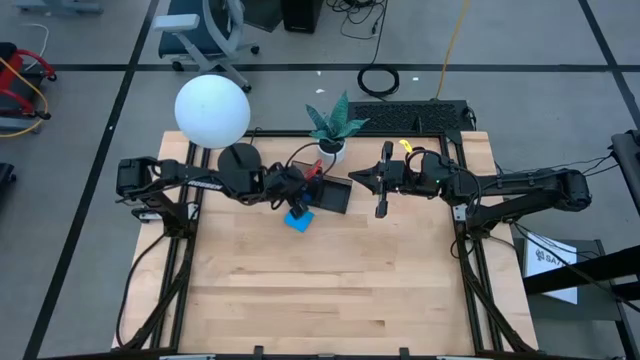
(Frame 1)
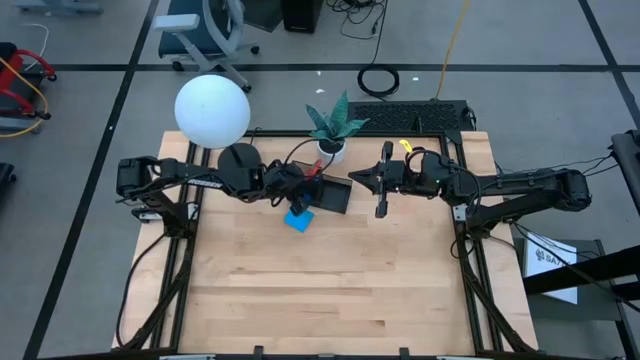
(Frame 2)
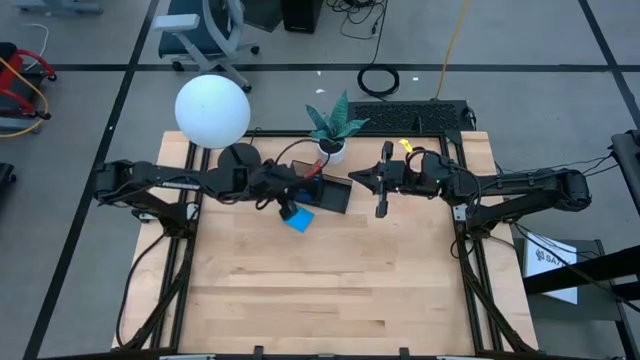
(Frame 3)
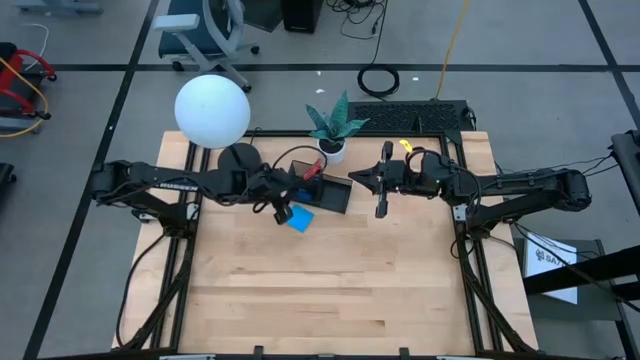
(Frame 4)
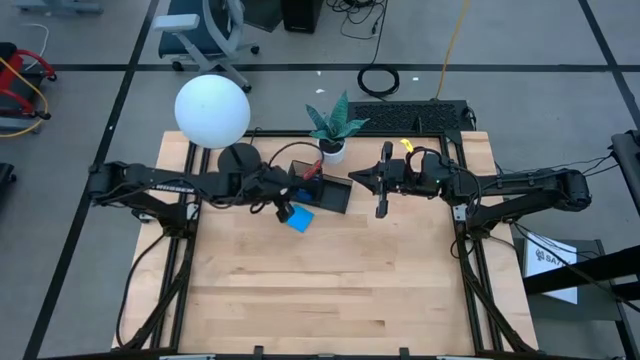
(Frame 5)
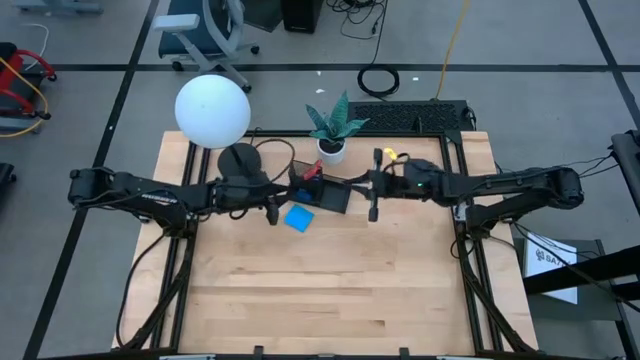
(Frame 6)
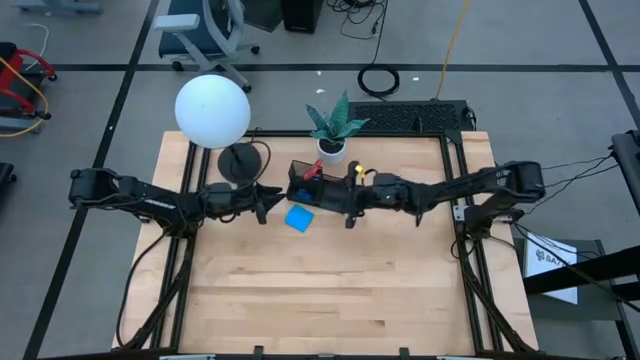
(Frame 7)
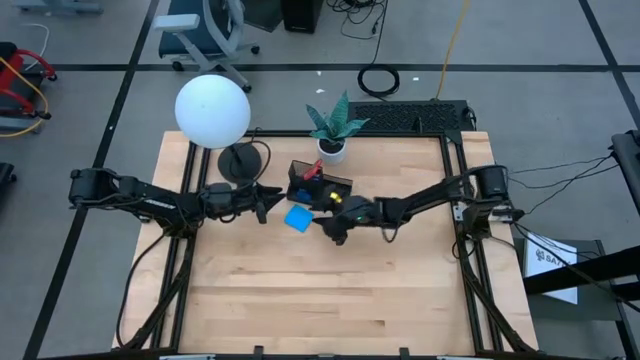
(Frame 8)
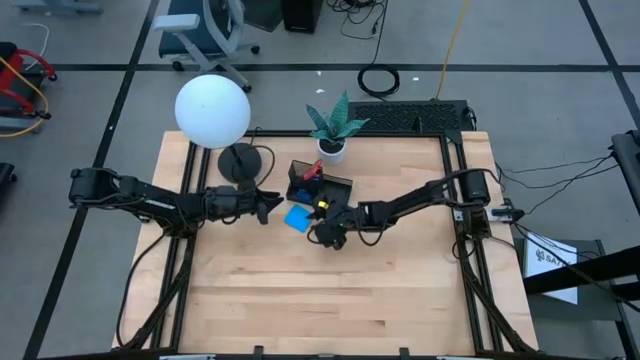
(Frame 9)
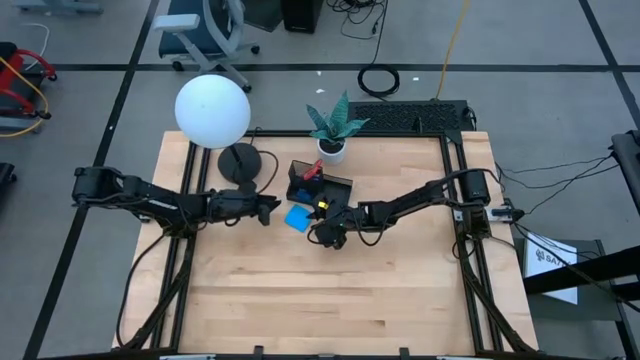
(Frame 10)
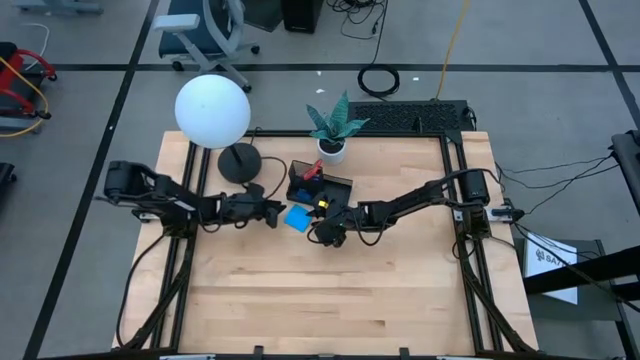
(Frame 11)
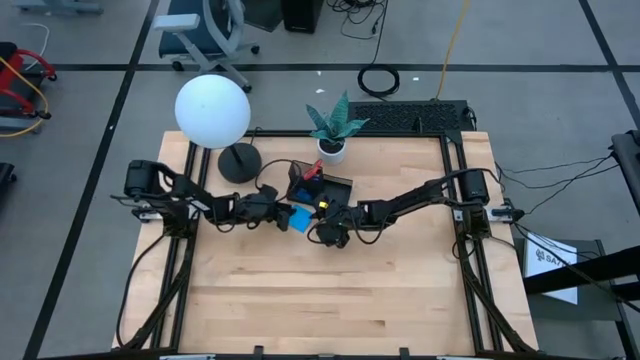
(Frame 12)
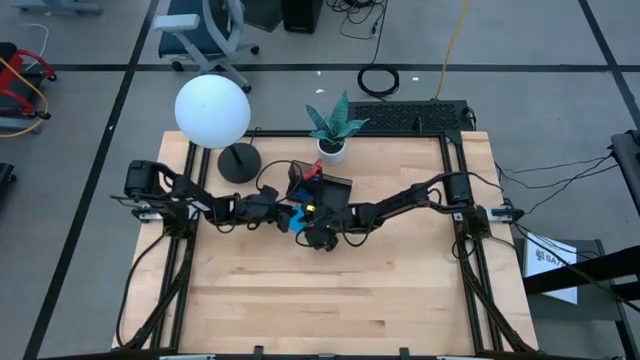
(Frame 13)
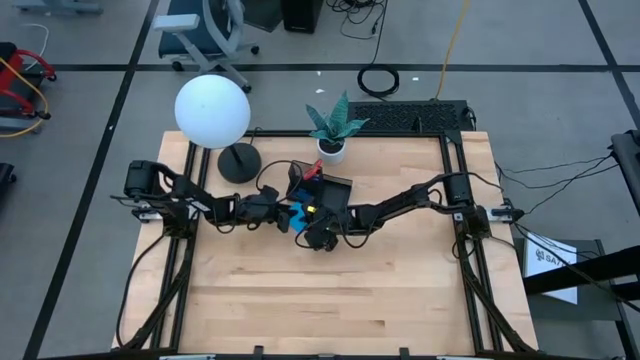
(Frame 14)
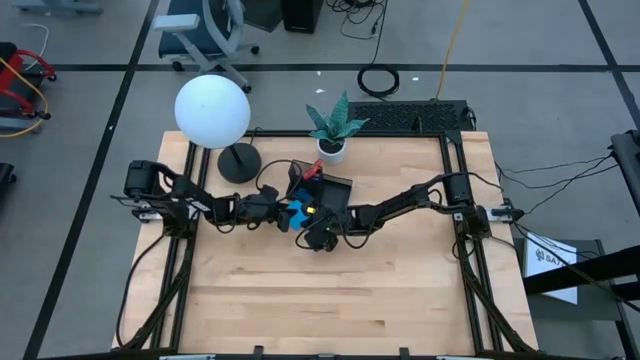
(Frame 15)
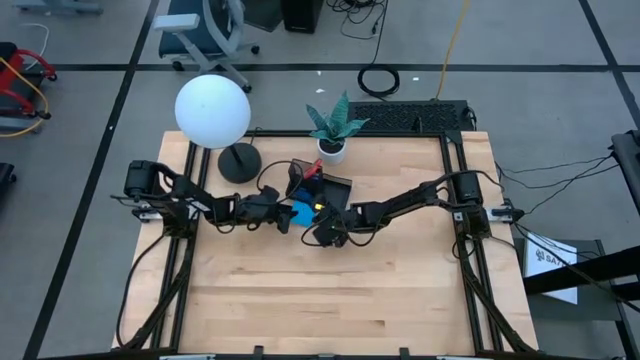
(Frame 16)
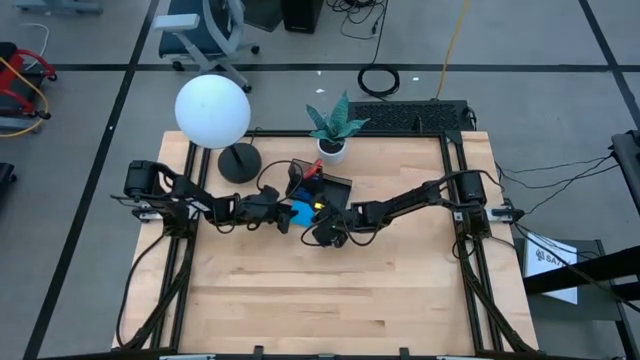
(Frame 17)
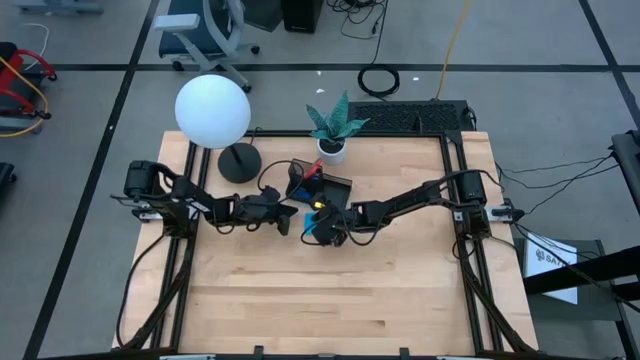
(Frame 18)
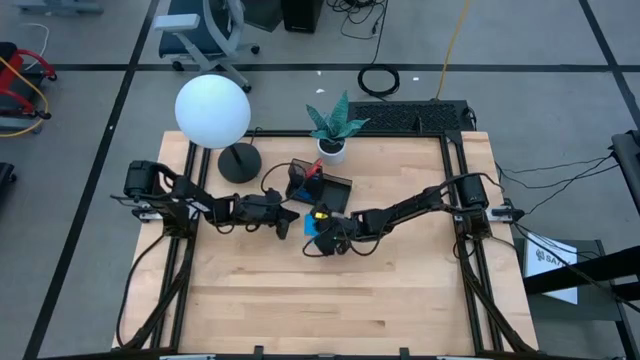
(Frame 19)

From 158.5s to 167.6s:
Task: Pick and place office supplies into organizer
Put the blue sticky notes into the desk organizer

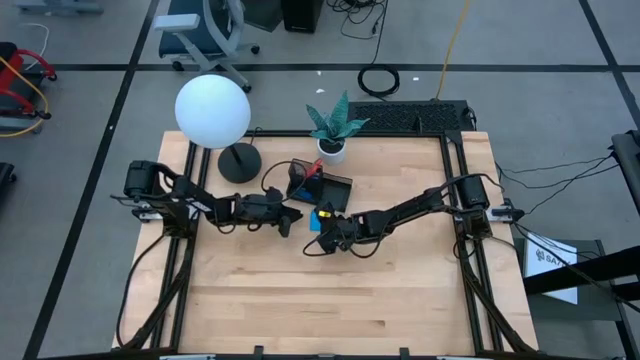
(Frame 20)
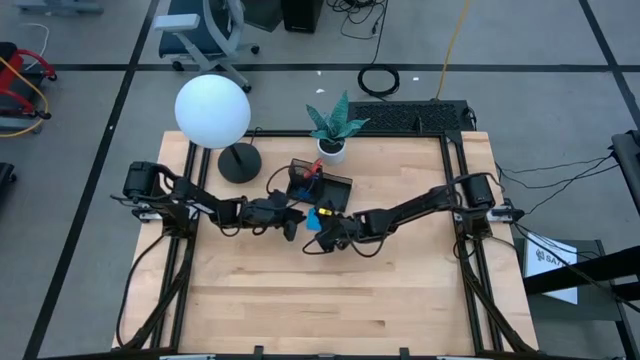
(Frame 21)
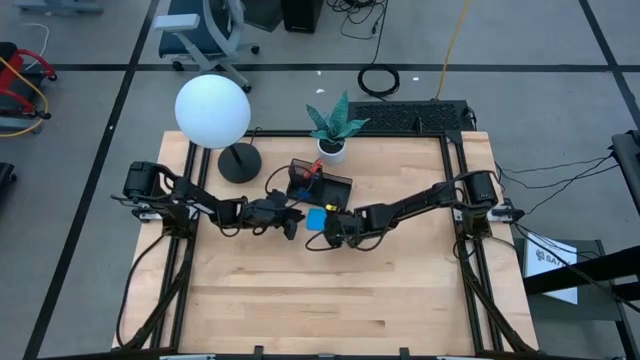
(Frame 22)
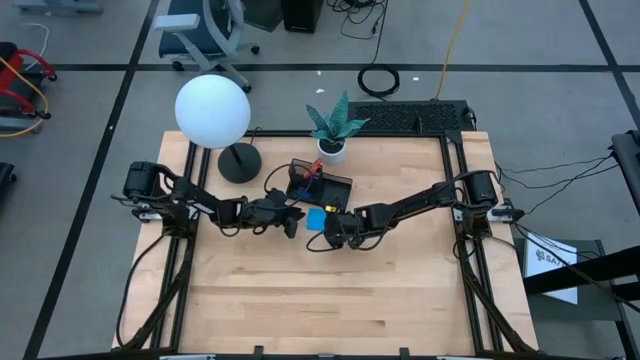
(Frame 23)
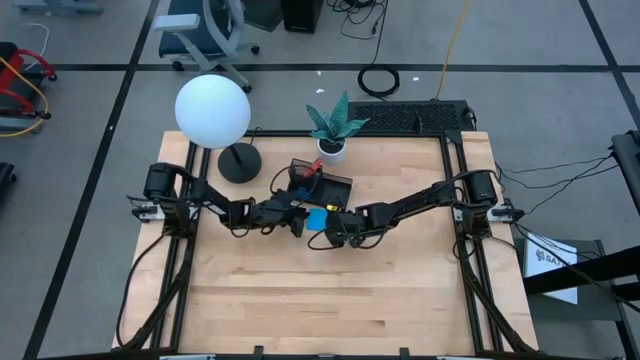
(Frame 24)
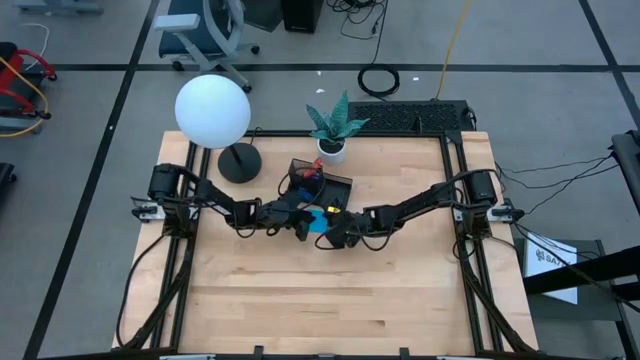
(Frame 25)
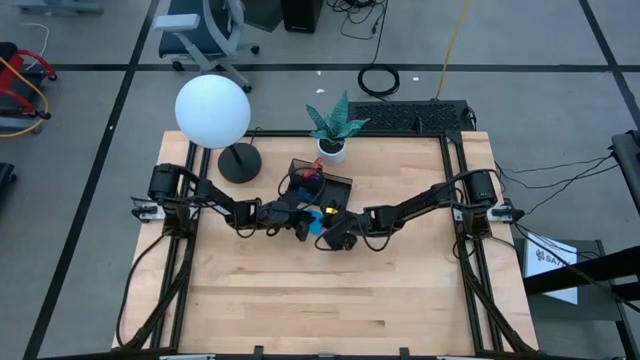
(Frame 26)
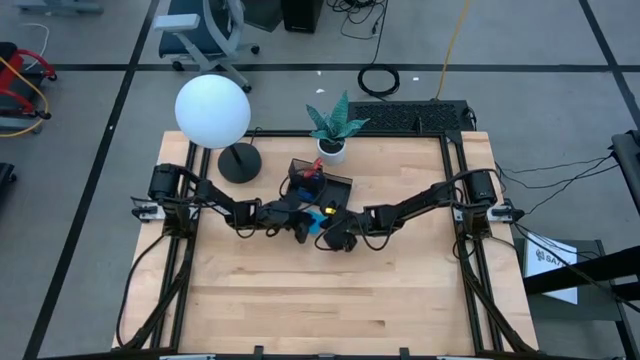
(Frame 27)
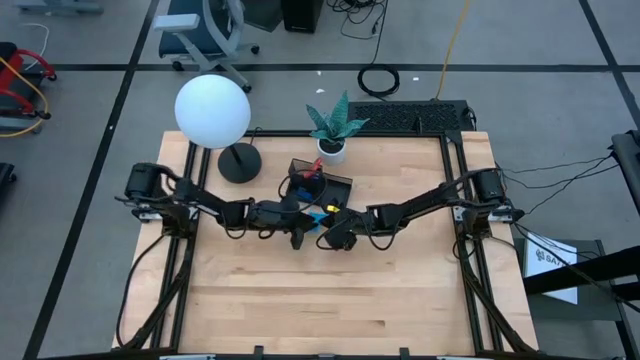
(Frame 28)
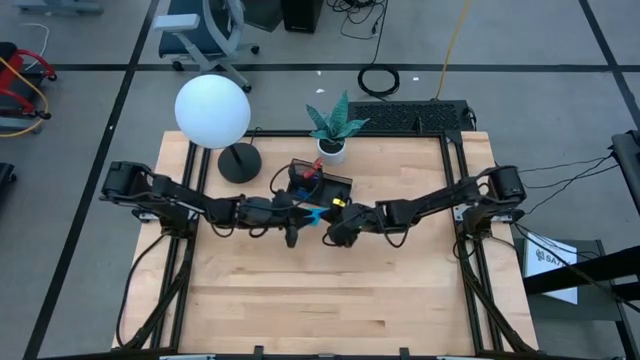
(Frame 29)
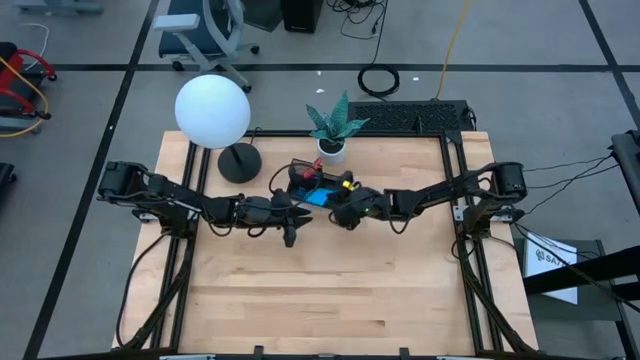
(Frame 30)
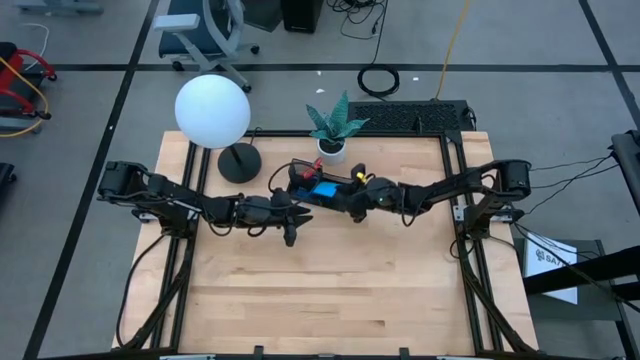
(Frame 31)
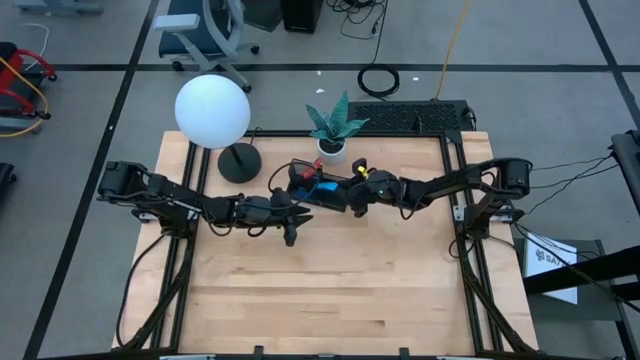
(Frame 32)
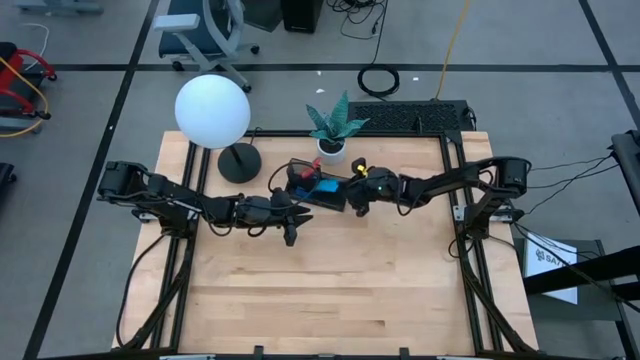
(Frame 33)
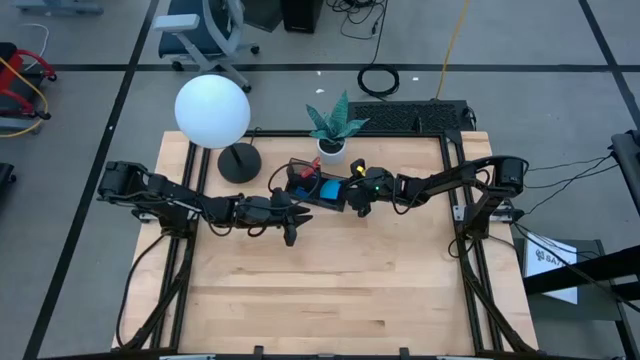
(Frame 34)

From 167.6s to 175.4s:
Put the blue sticky note into the desk organizer

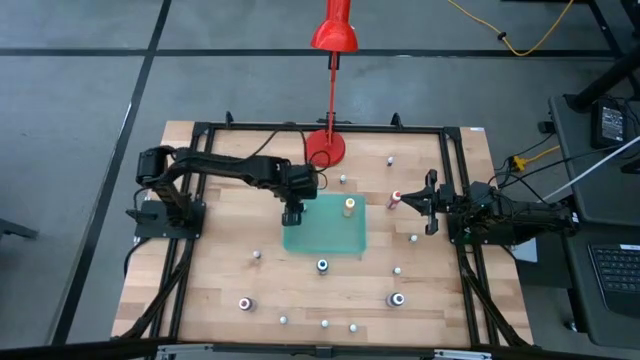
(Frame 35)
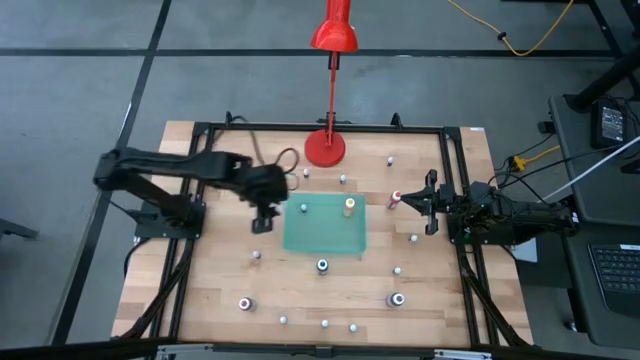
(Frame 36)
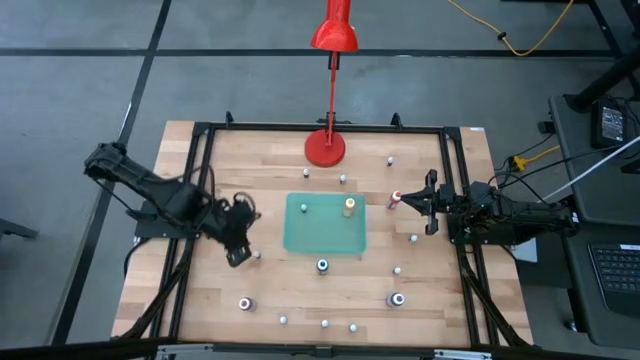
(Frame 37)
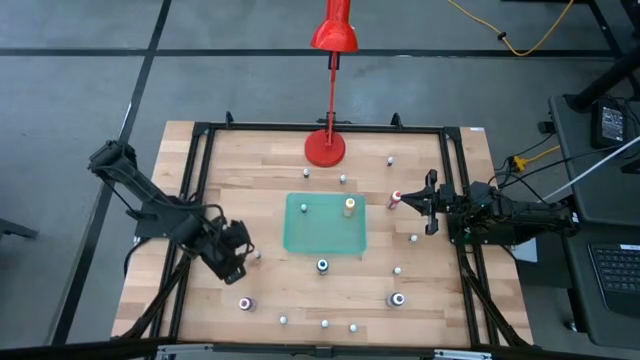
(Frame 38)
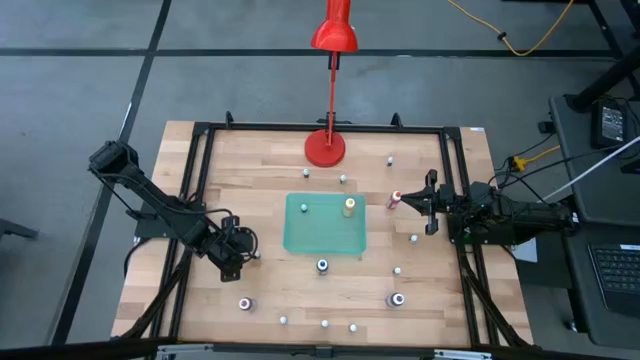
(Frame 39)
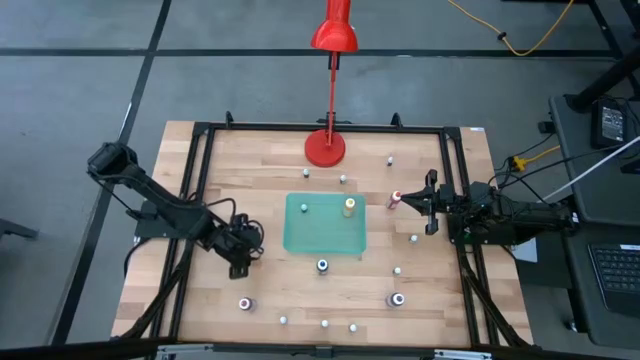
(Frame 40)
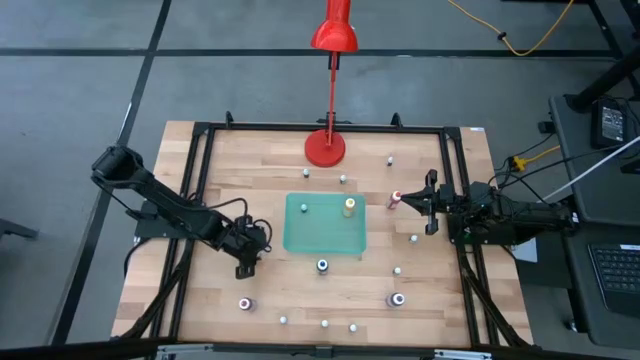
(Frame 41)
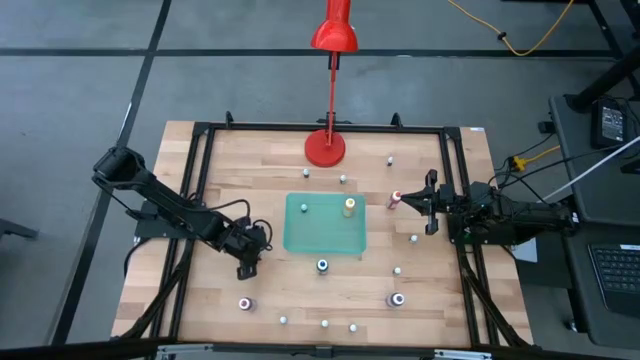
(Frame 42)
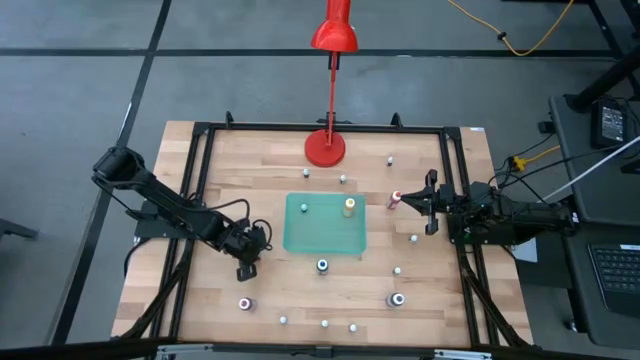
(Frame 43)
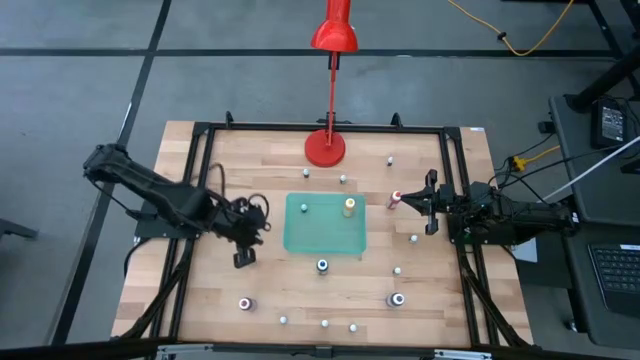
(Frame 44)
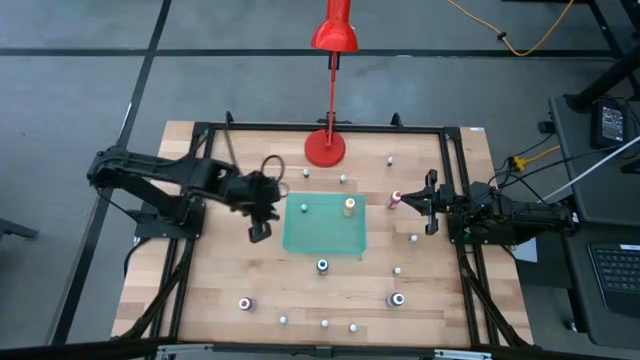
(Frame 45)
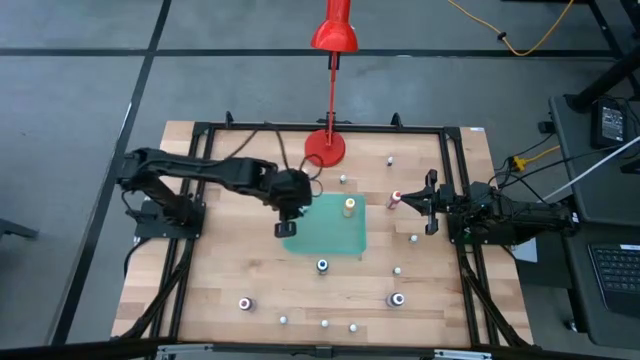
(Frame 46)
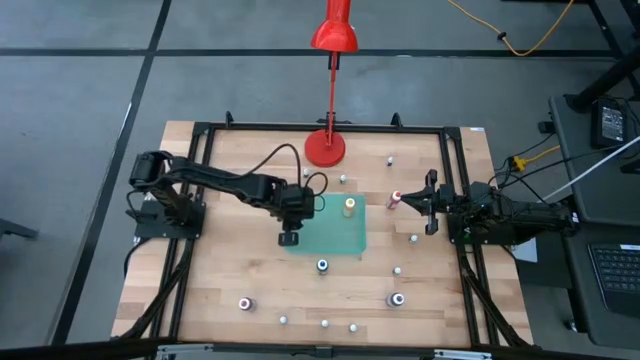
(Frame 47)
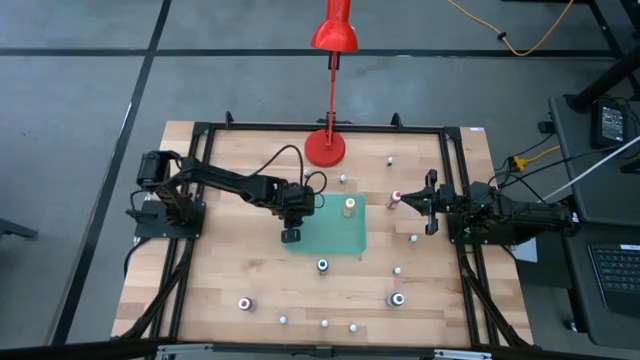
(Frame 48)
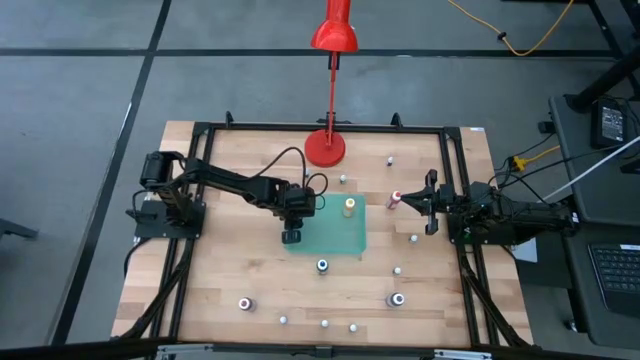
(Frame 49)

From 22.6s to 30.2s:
Task: Pick & Place food coloring
Put the top small red food coloring bottle into the green bin
